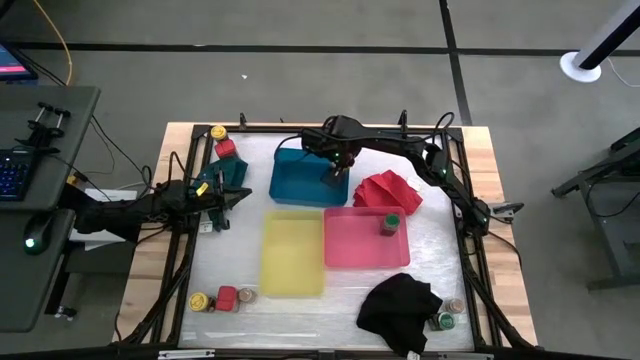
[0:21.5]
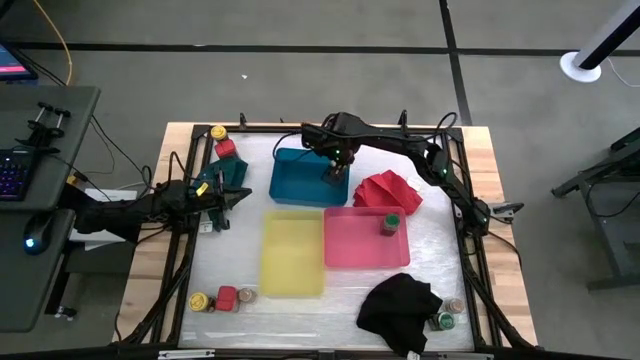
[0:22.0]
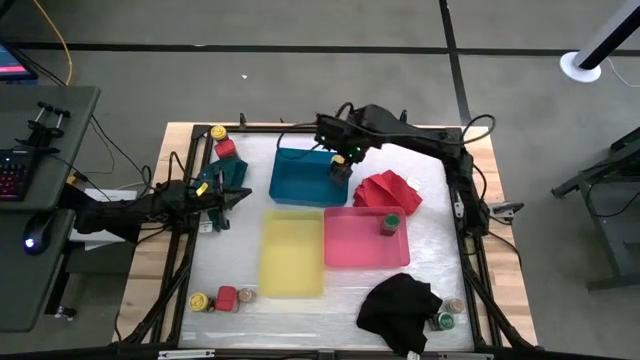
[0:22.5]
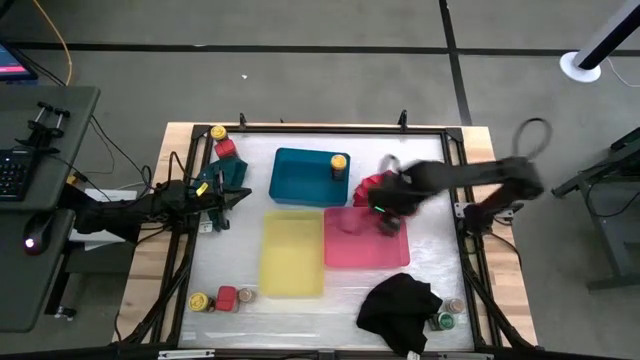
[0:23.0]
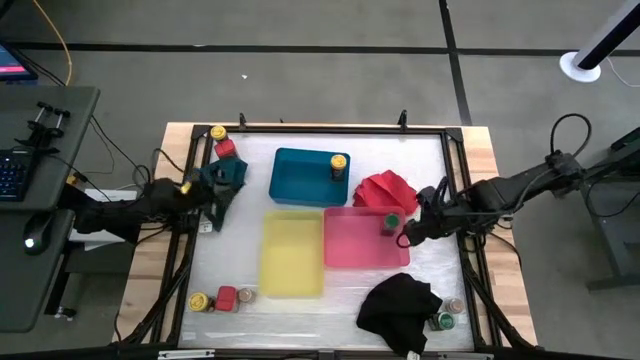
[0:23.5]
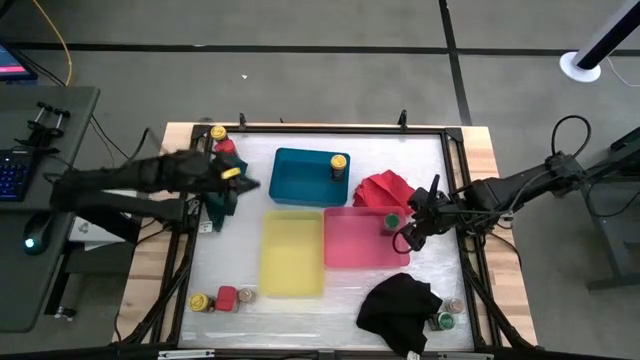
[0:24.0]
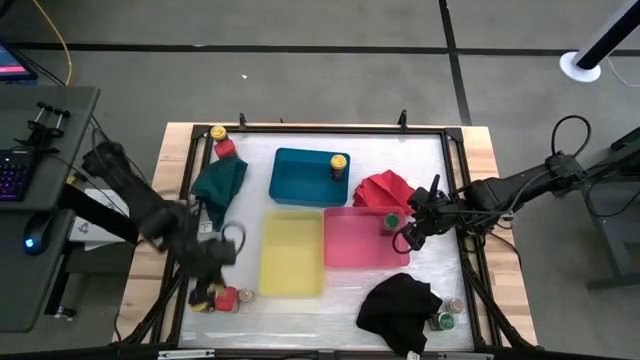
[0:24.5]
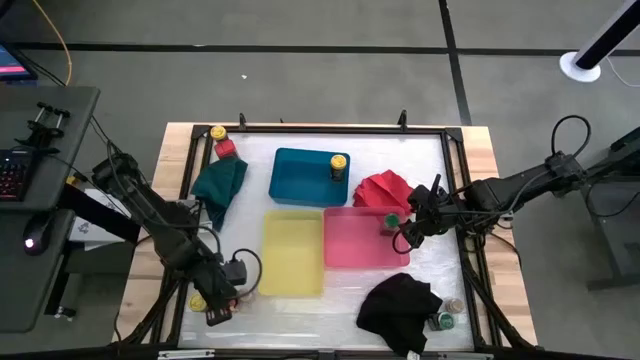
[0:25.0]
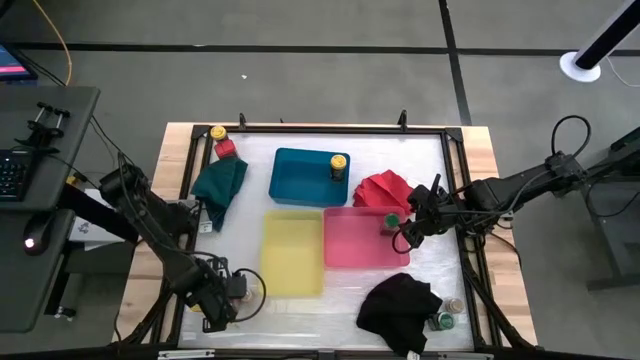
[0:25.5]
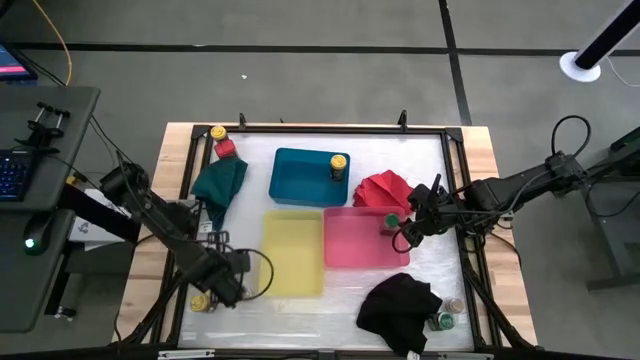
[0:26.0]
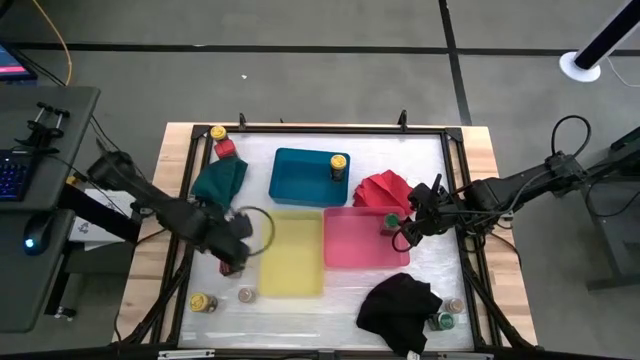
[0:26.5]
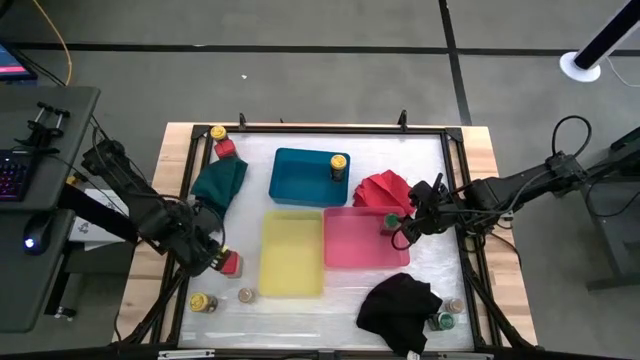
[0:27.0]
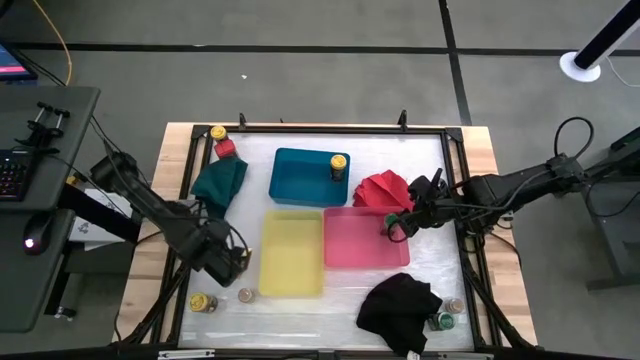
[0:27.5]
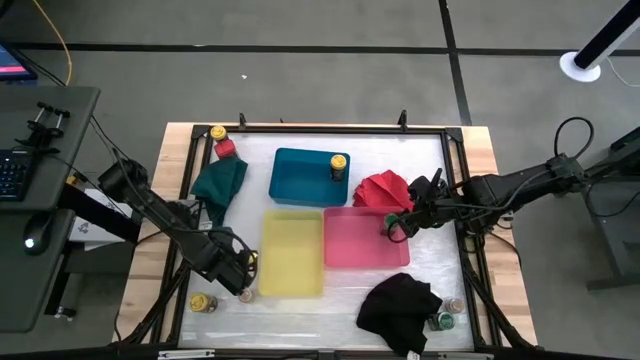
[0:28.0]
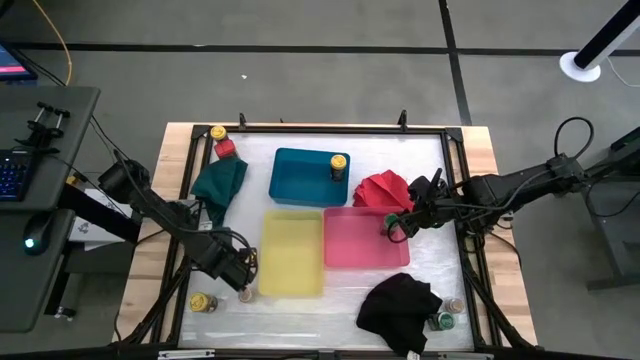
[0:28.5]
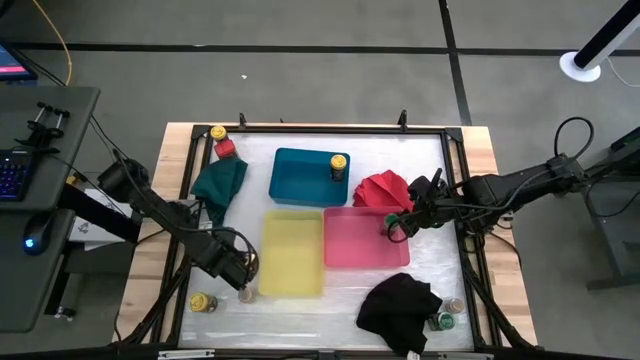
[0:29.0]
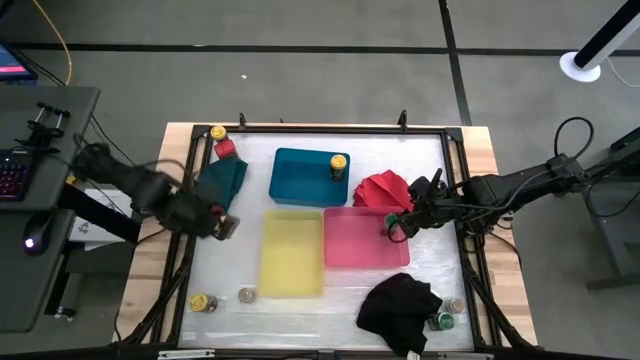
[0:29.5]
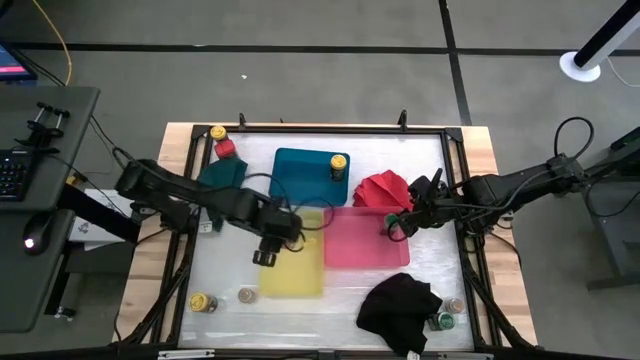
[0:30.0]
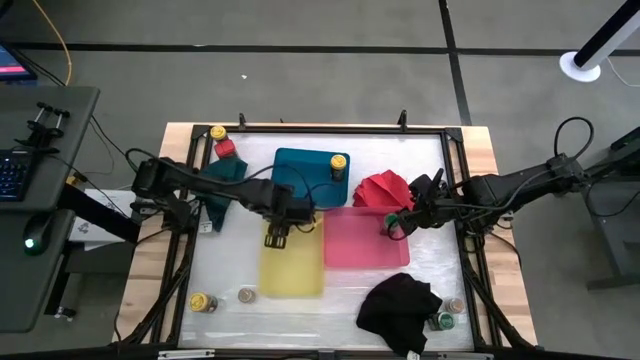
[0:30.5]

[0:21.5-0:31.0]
Task: Sort spices by type
Put the red spice bottle into the yellow bin

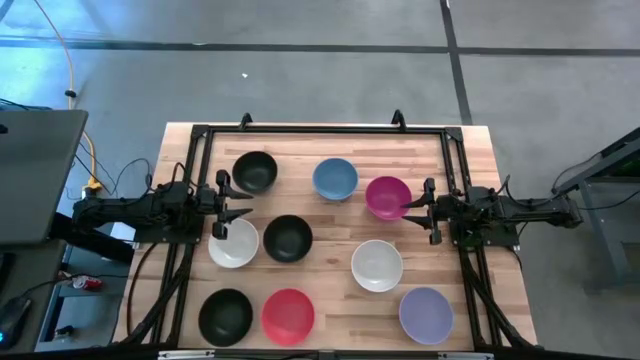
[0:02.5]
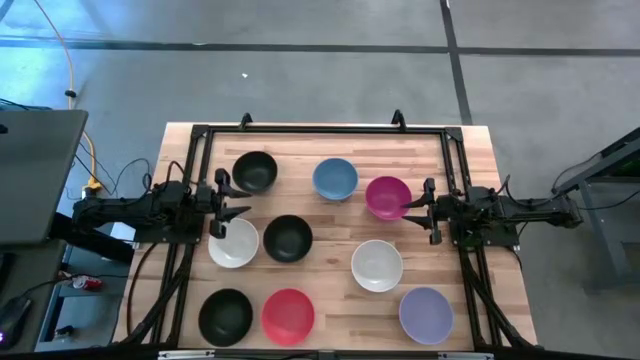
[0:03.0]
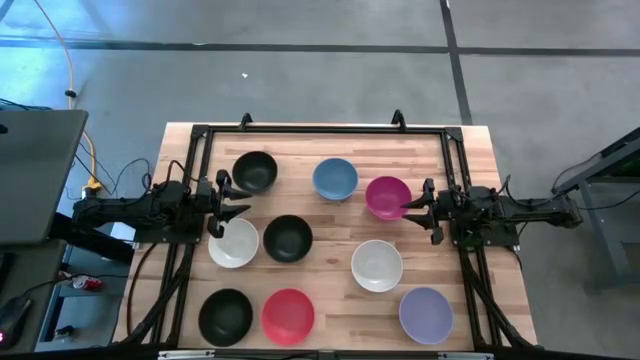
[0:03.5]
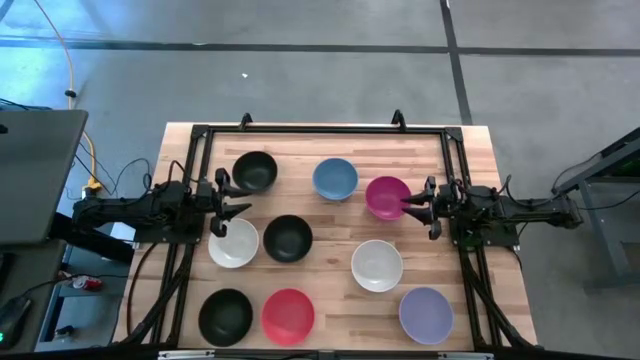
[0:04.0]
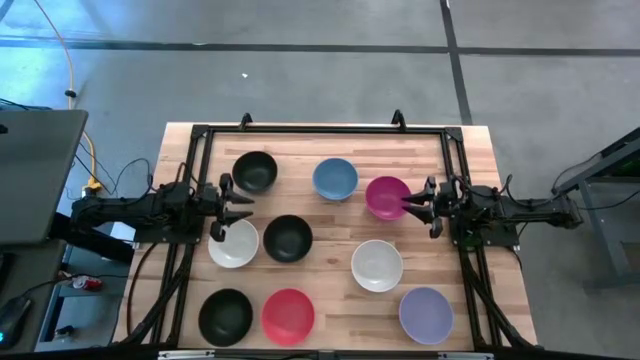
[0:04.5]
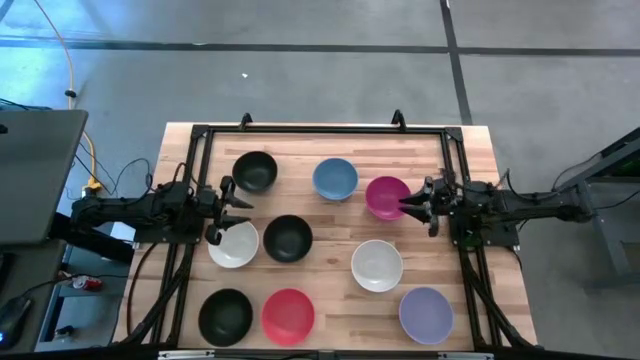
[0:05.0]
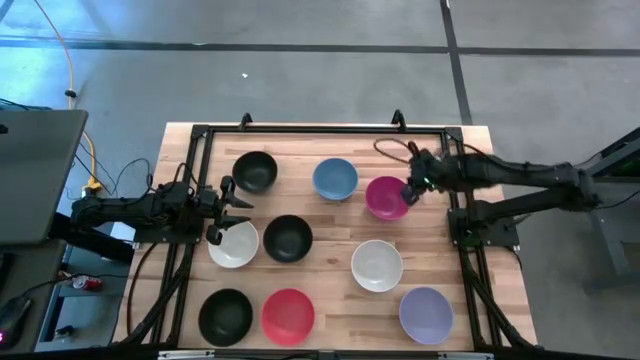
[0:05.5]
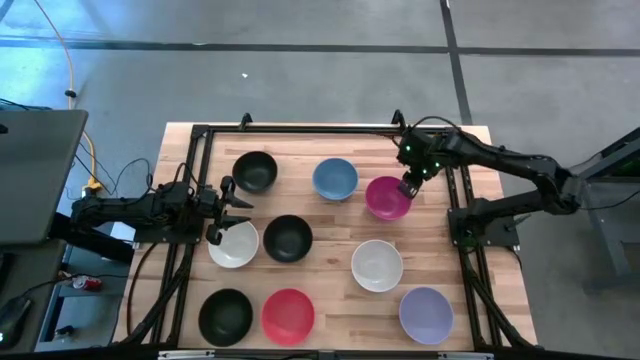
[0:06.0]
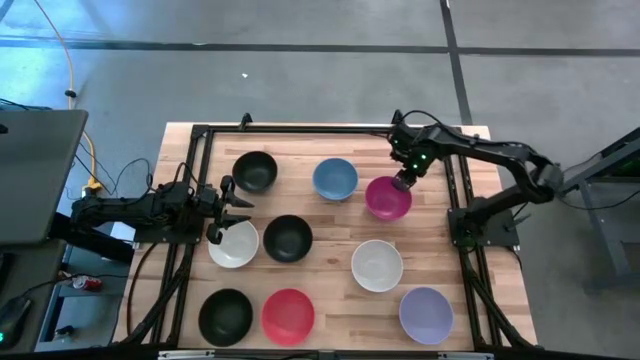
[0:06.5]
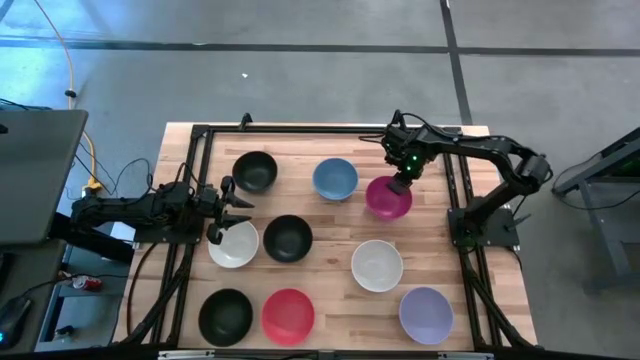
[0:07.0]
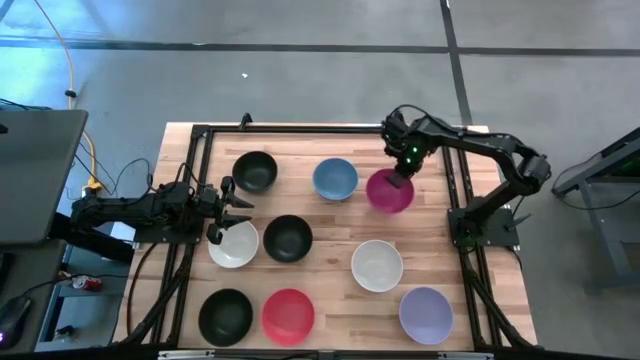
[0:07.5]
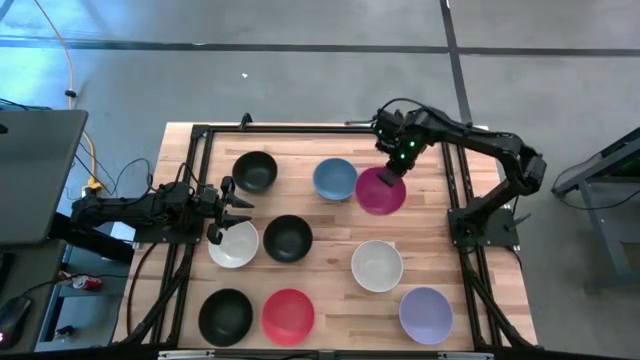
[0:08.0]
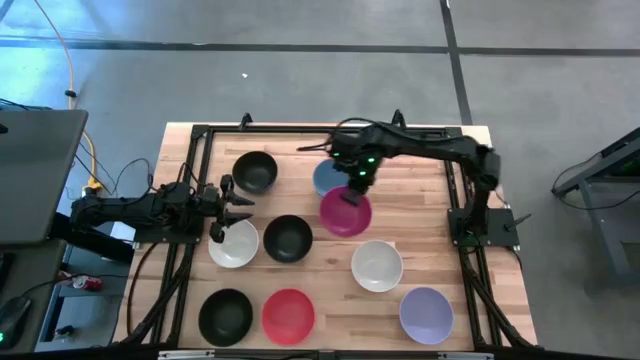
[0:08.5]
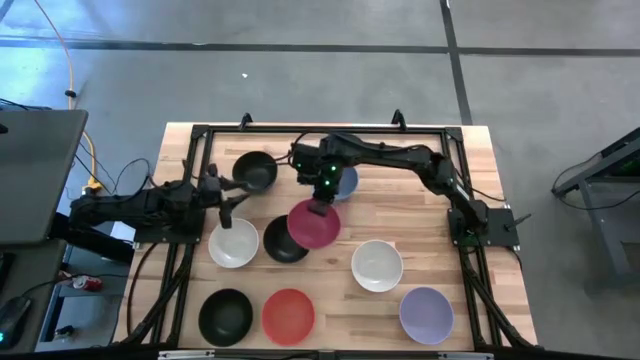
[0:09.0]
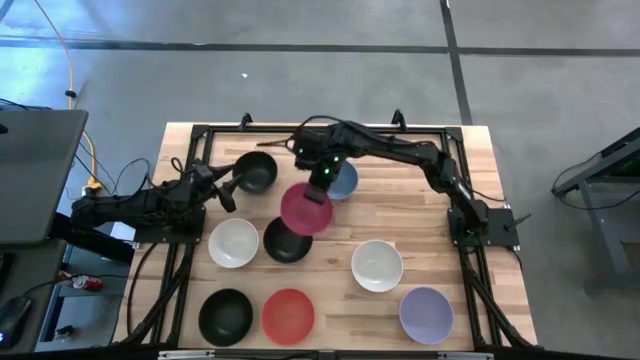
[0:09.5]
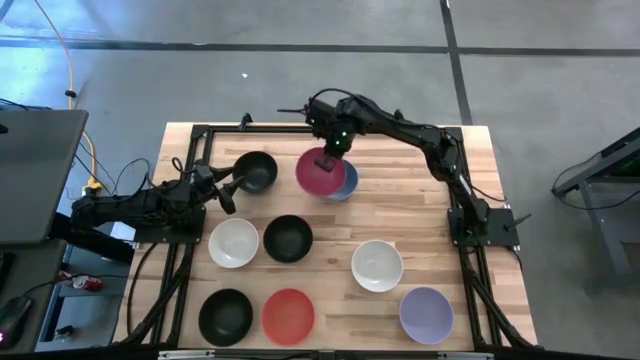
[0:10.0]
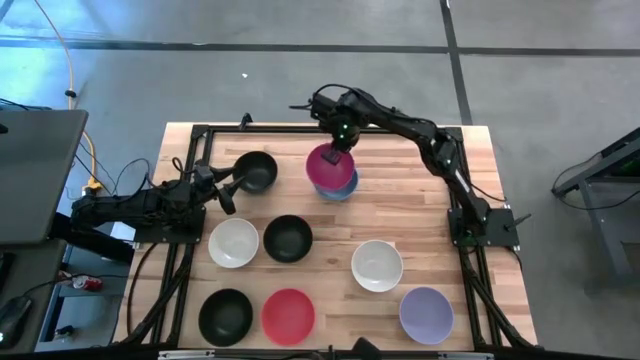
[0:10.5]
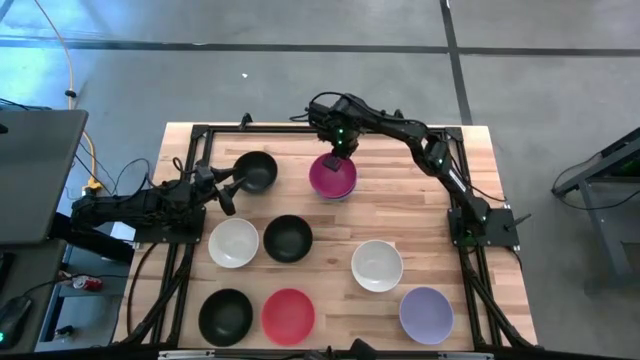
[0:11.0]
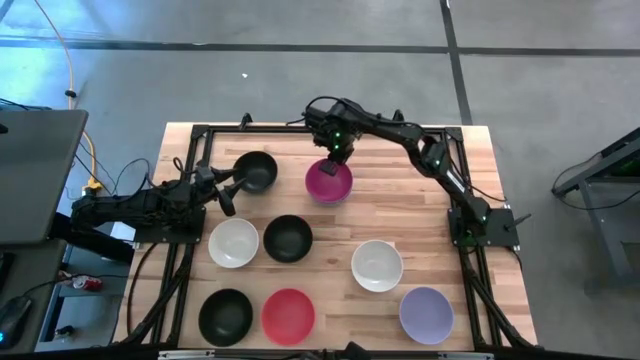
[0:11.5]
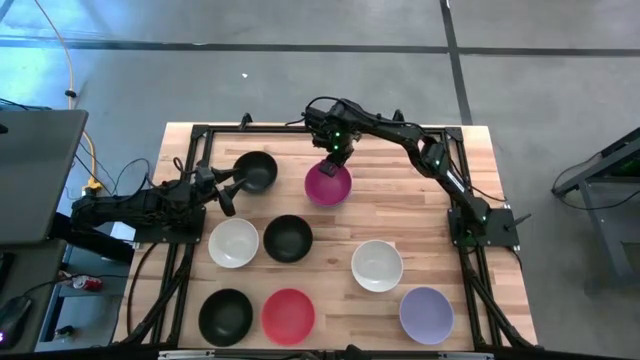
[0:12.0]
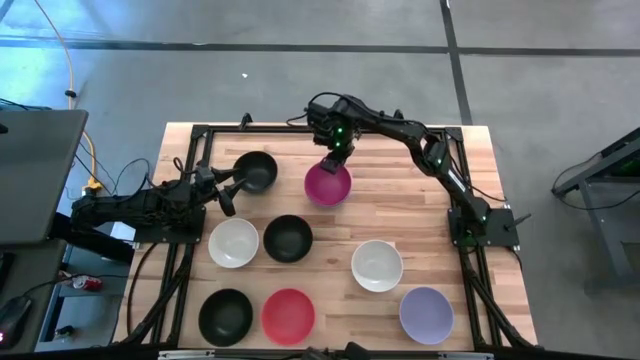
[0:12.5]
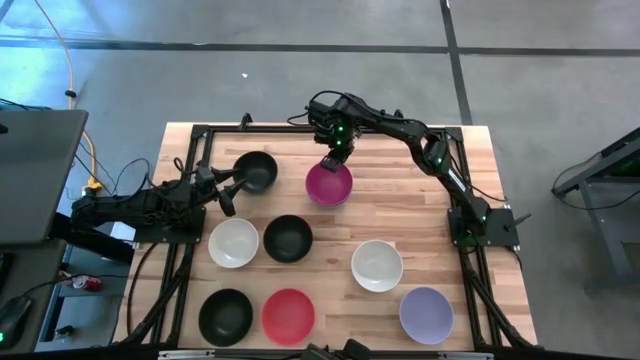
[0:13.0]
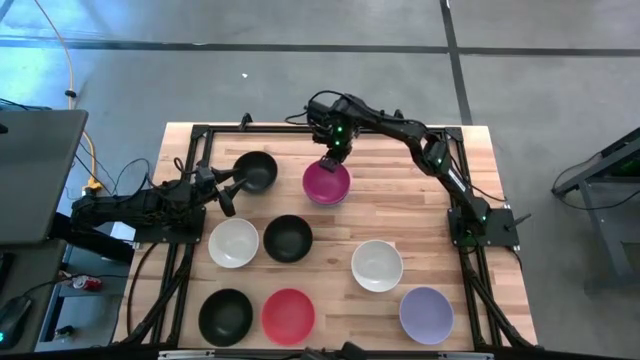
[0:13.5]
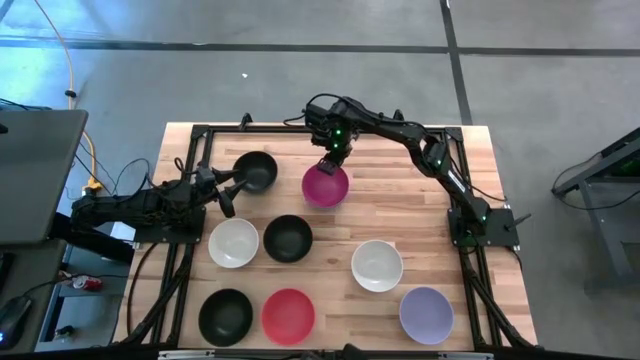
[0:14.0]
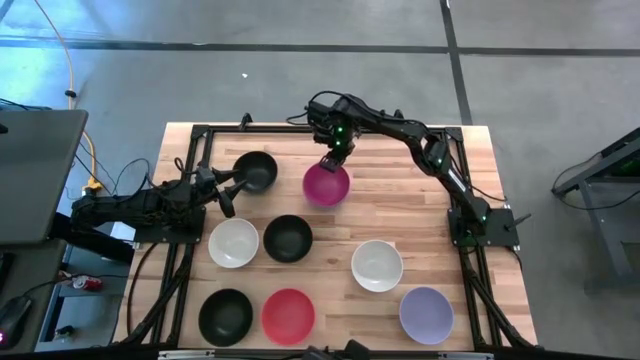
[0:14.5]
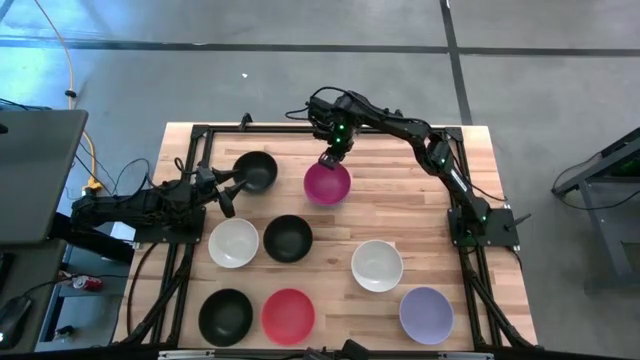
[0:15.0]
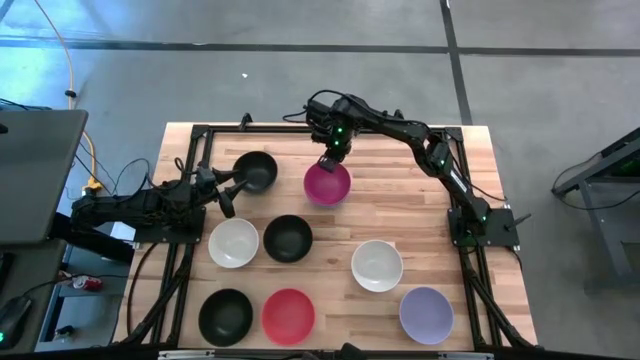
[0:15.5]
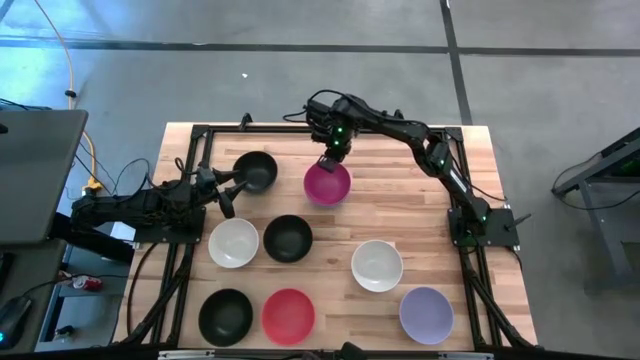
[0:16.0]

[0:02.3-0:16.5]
Task: Nest bowls inside each other
Stack the pink bowl on top of the blue bowl
